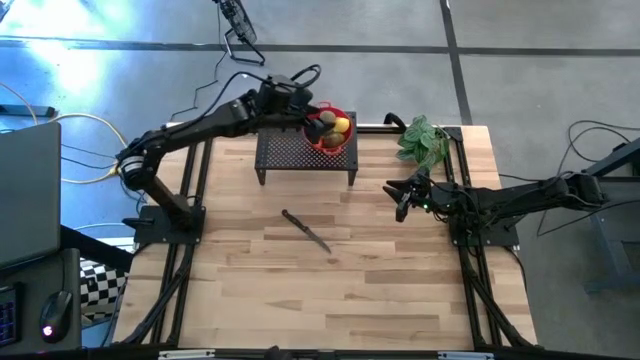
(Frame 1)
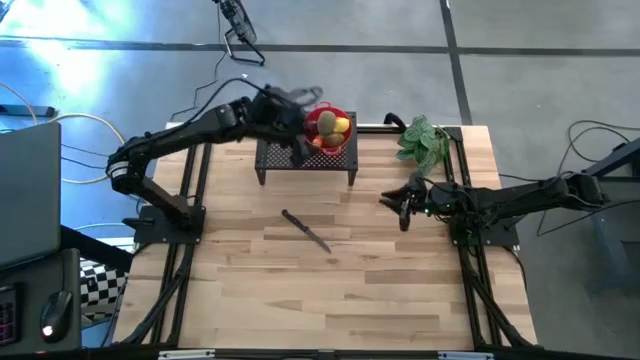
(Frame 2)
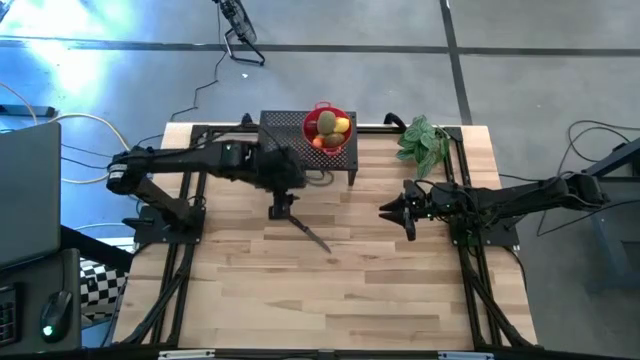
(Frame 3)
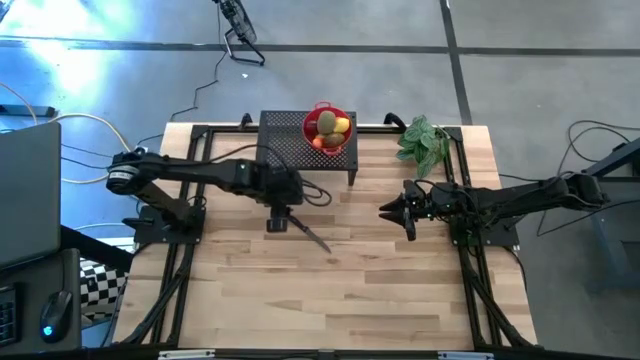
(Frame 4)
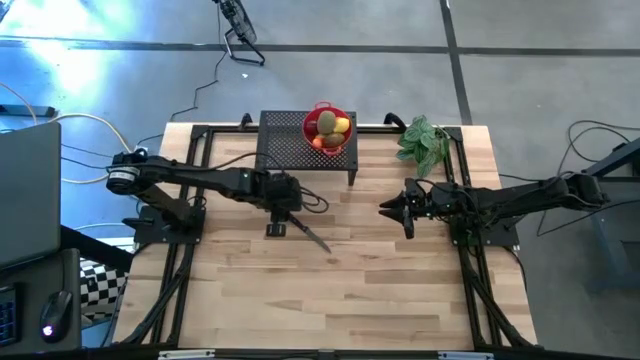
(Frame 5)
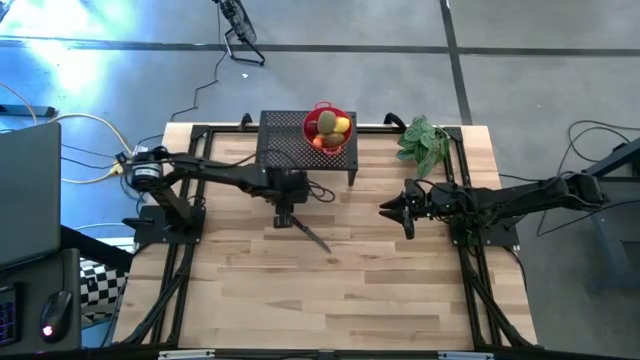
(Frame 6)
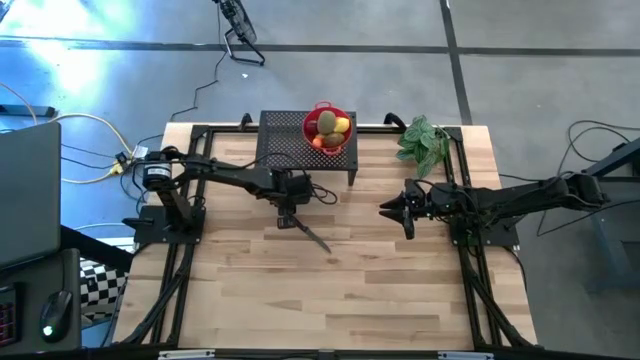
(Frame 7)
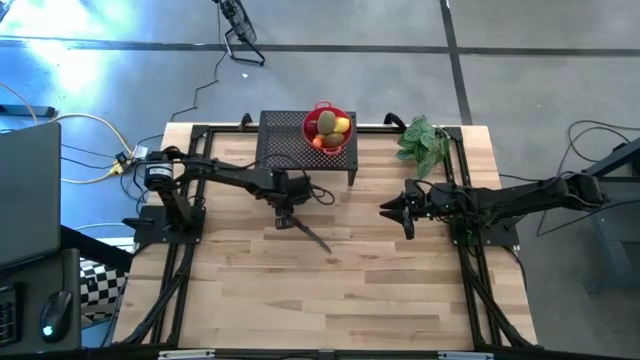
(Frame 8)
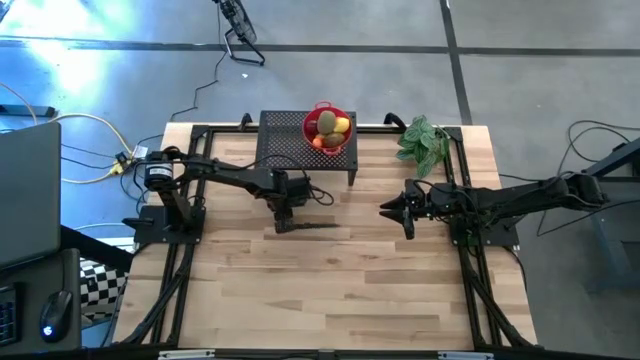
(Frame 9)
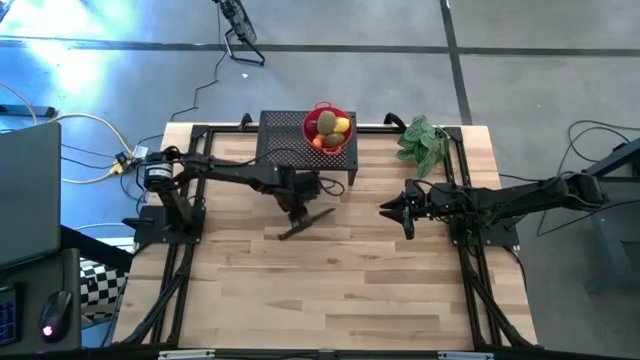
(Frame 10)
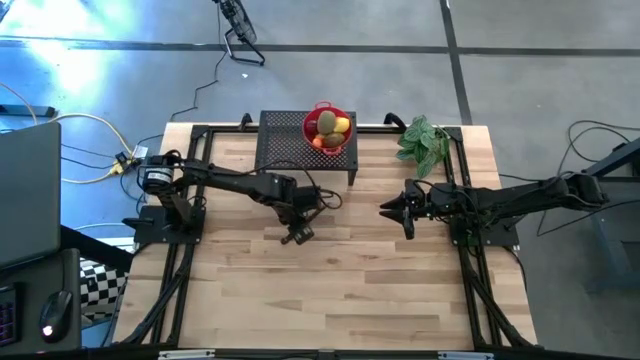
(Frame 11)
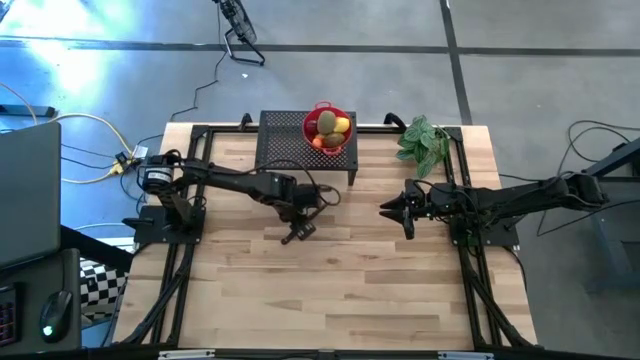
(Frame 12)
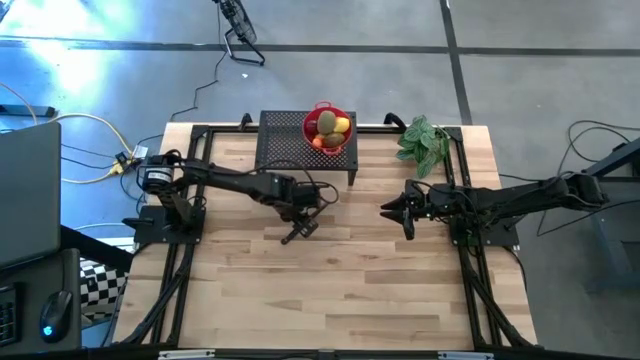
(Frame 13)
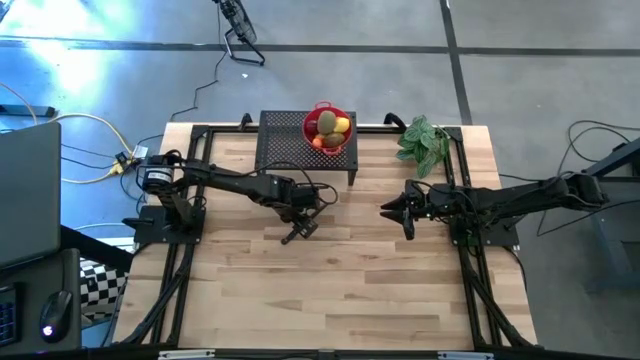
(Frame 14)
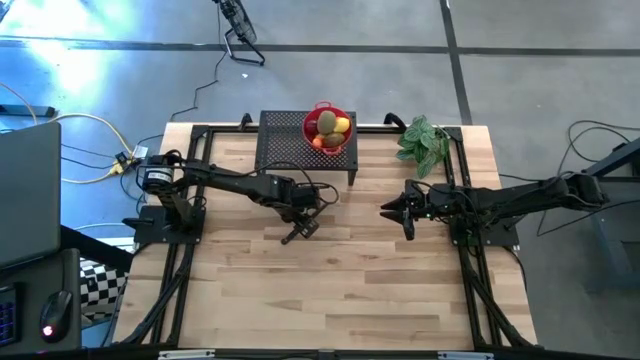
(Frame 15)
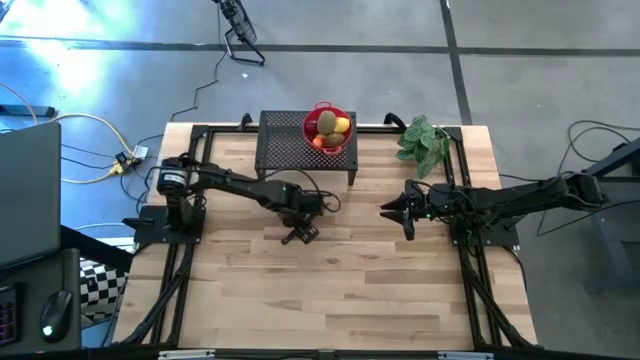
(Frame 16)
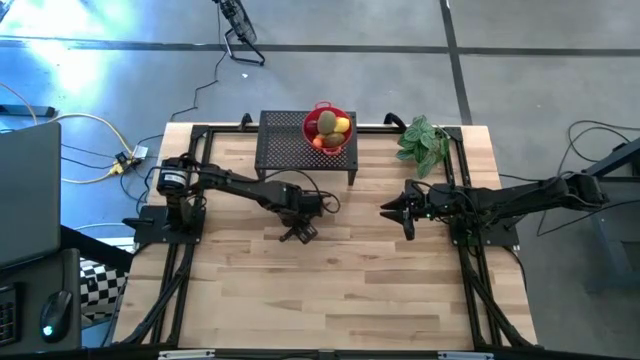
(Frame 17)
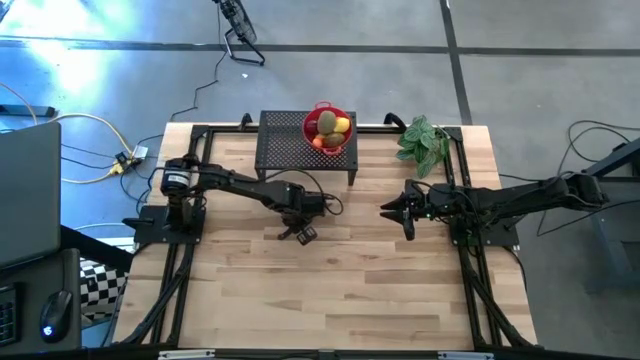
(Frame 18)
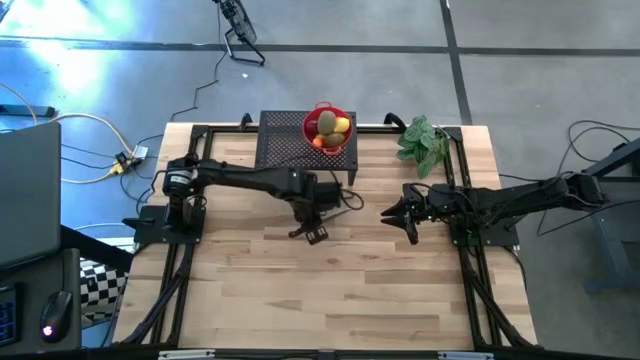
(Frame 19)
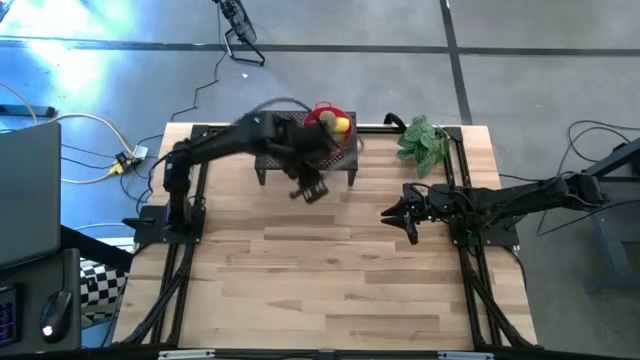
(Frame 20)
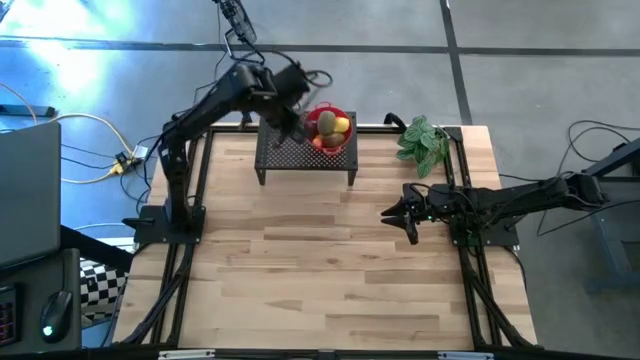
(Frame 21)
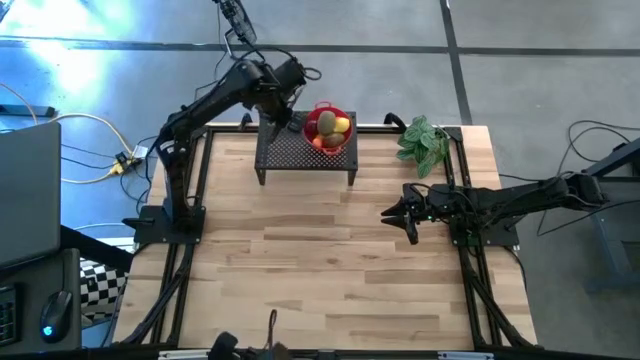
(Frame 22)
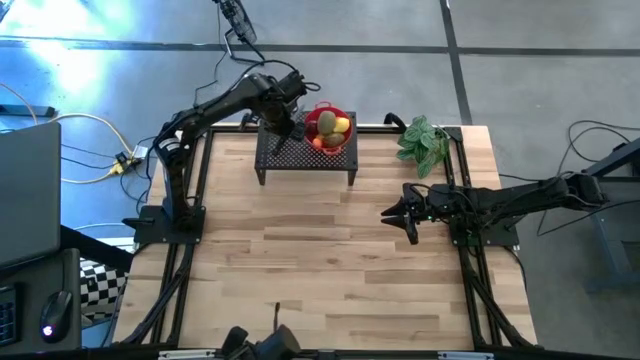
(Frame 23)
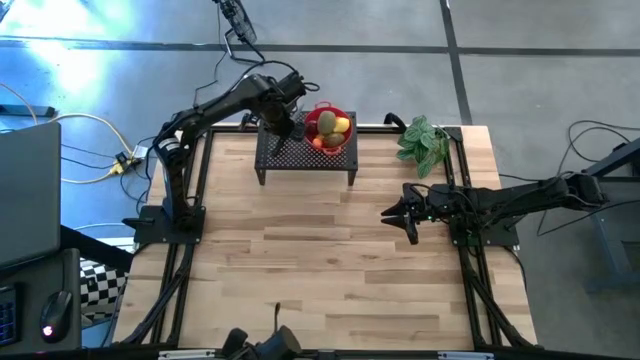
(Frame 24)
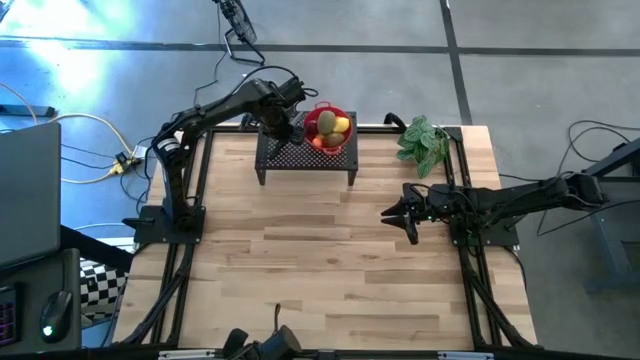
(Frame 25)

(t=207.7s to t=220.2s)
Task: Pick & Place Fruit
Put the knife on the shelf

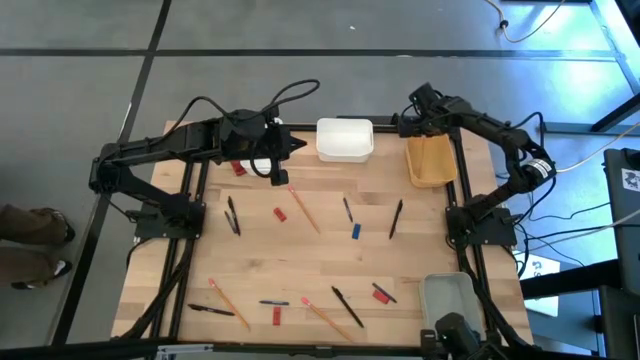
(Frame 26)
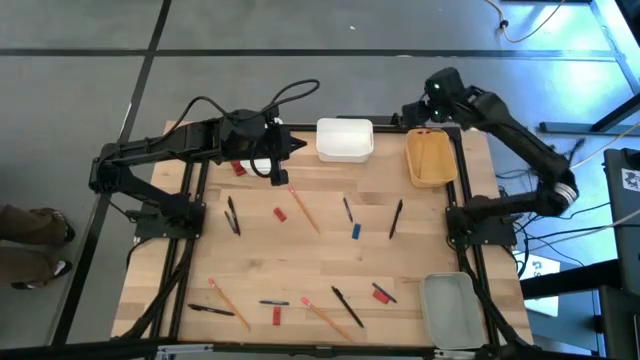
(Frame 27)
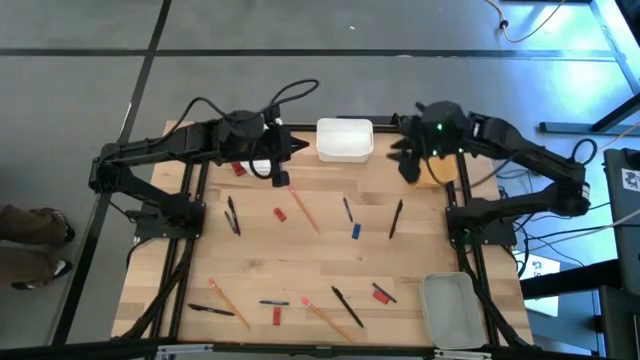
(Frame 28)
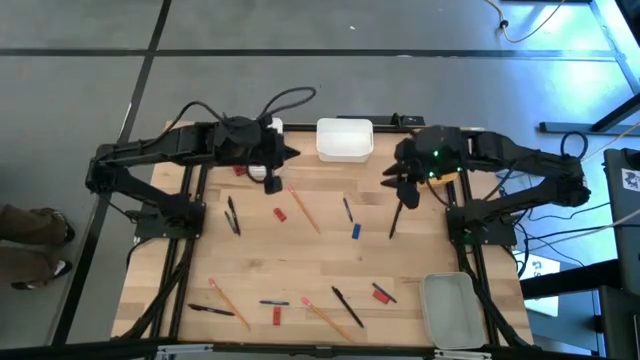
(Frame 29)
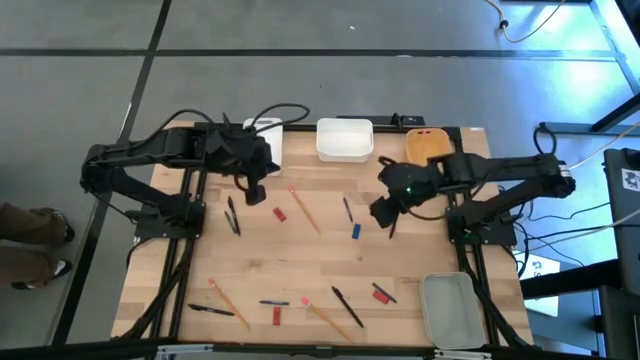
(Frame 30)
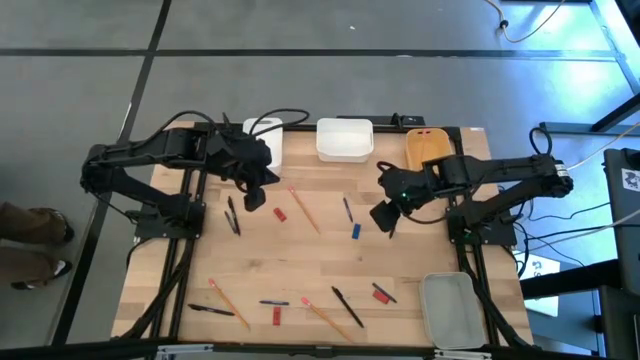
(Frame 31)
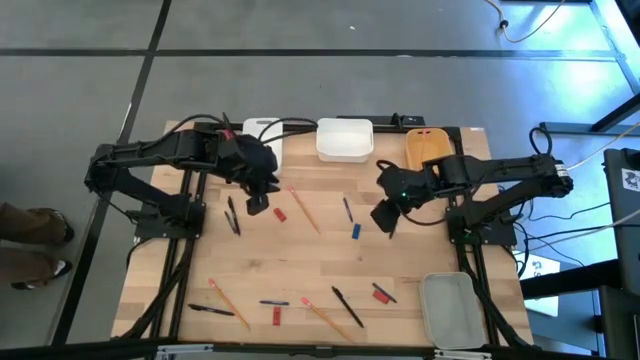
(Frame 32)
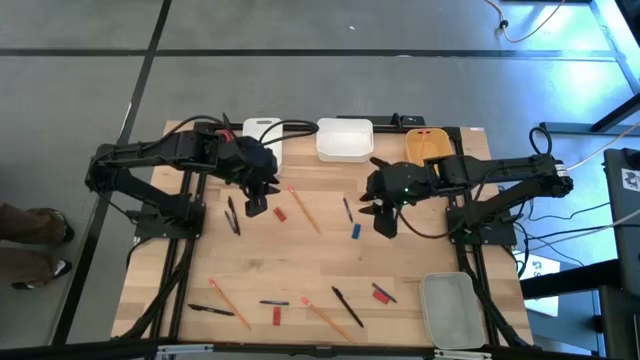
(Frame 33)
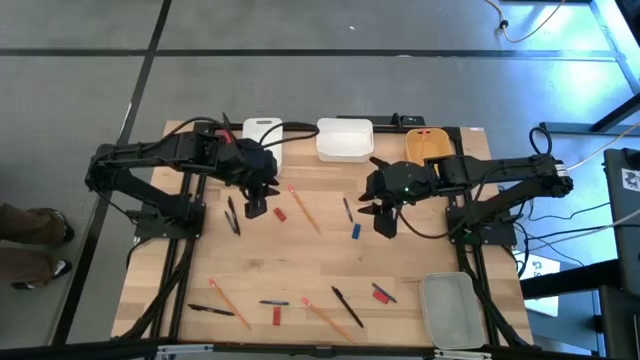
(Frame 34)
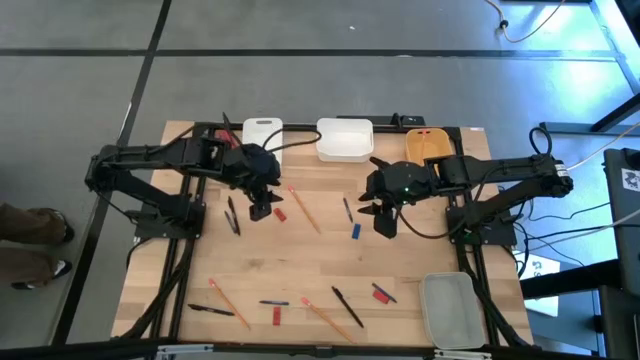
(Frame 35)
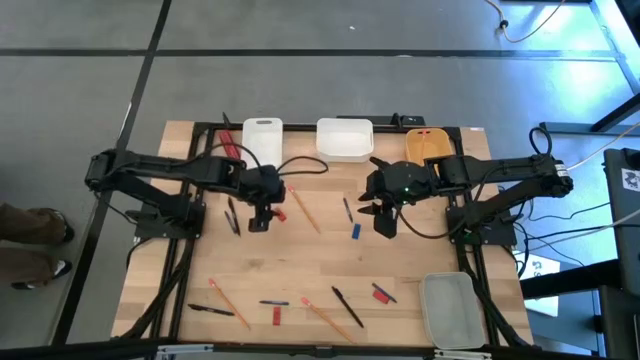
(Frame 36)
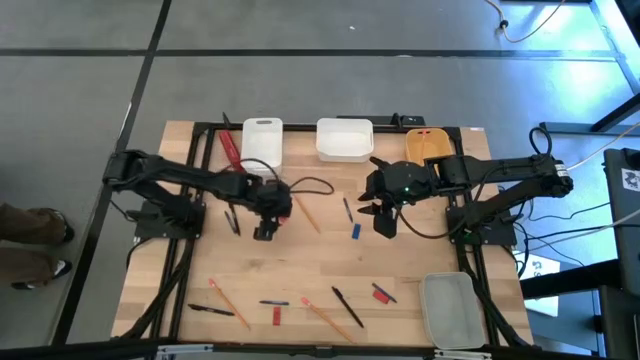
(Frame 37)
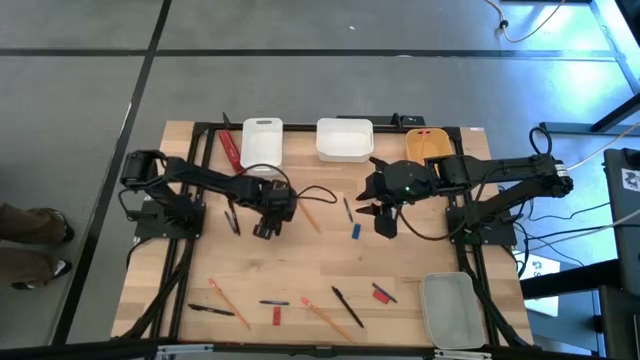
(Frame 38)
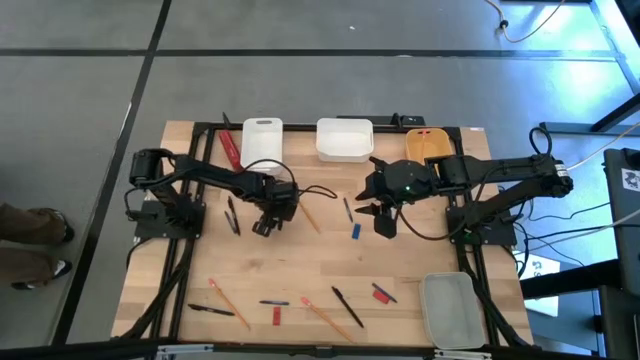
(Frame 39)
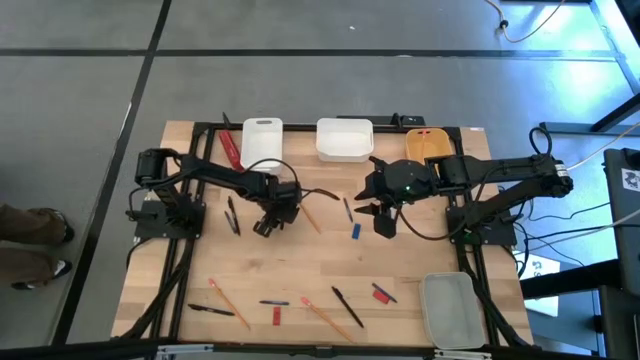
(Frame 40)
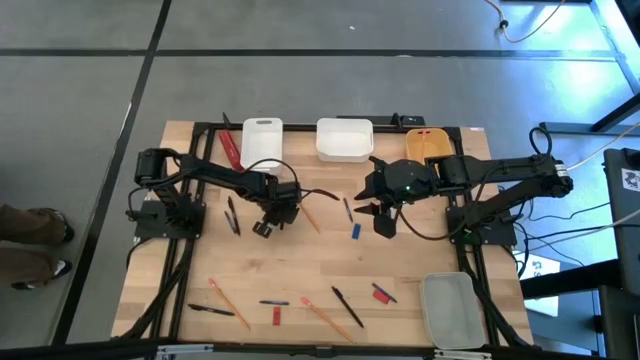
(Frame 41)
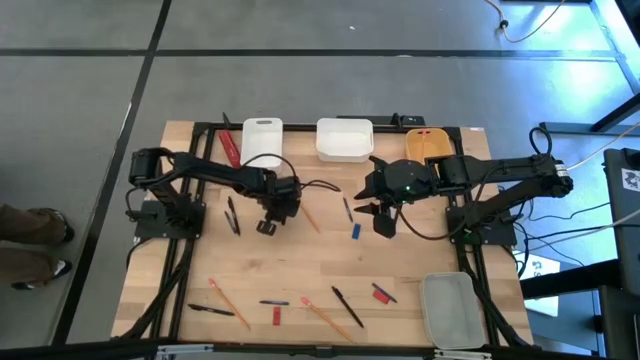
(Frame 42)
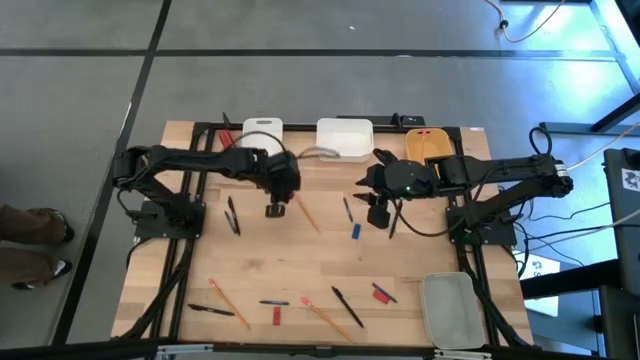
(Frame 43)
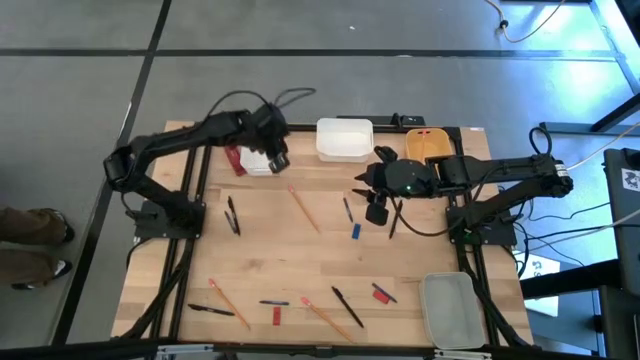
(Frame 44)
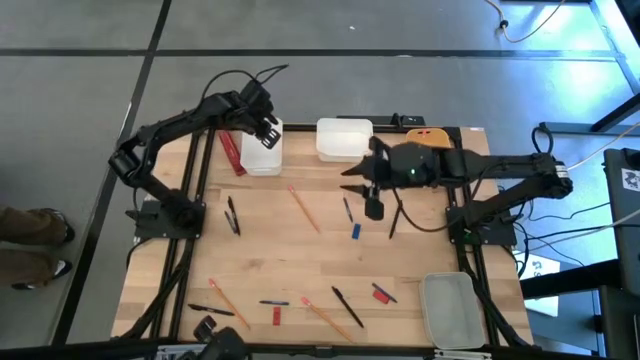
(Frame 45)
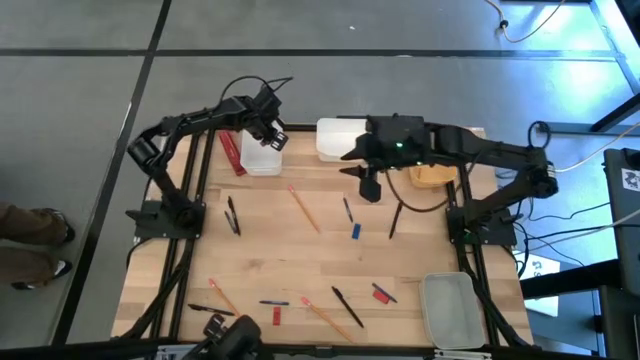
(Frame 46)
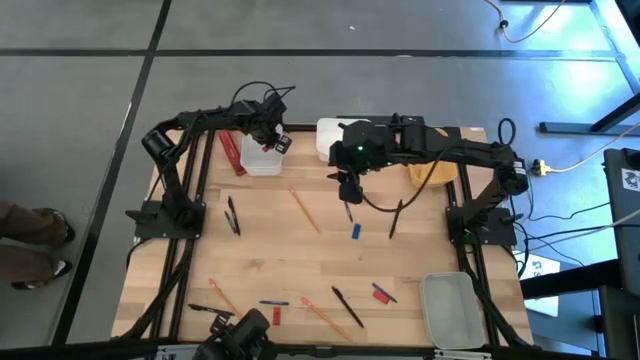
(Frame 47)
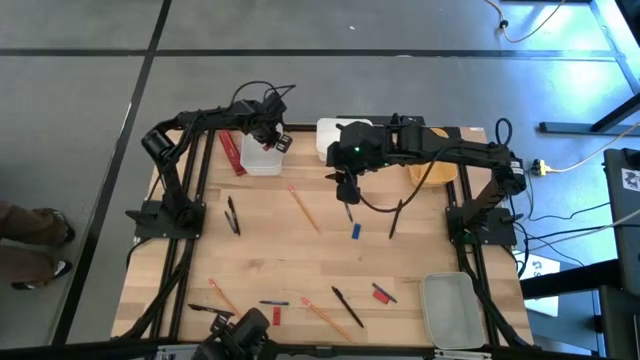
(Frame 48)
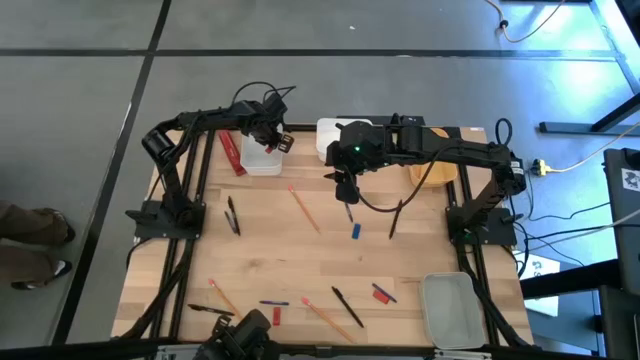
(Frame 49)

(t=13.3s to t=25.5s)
Task: Sort crayons/erasers/pens/pencils in bins
Put the top red eraser into the left white bin
